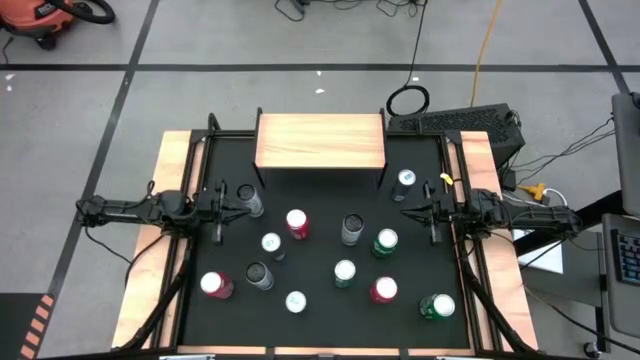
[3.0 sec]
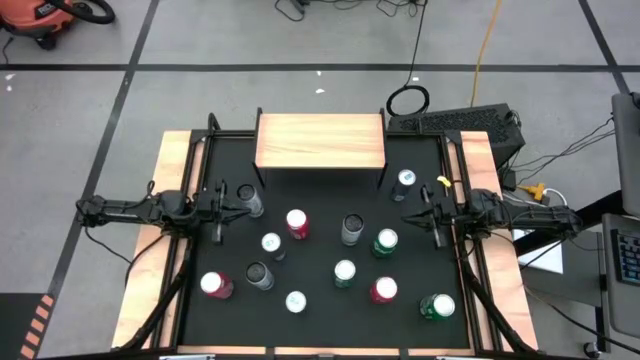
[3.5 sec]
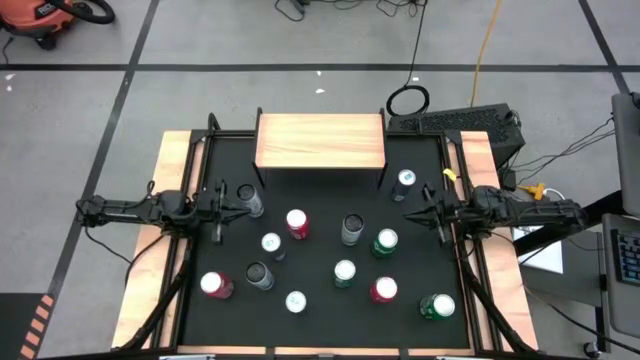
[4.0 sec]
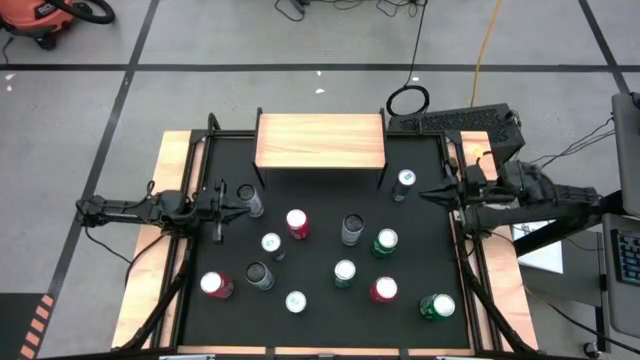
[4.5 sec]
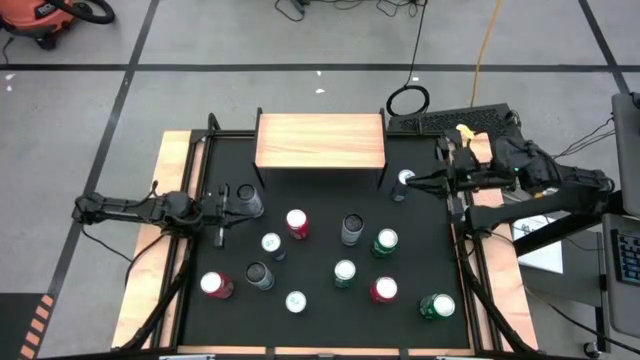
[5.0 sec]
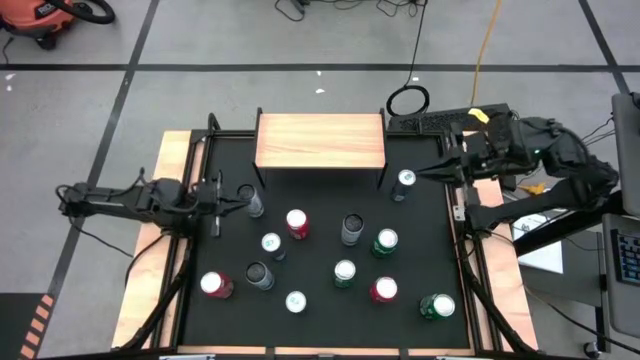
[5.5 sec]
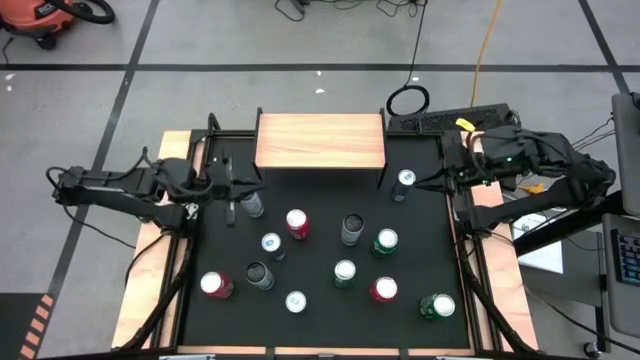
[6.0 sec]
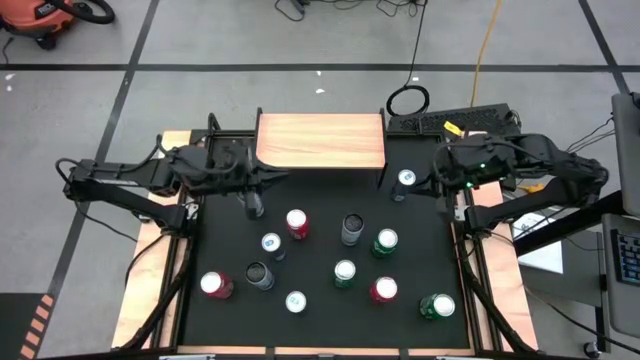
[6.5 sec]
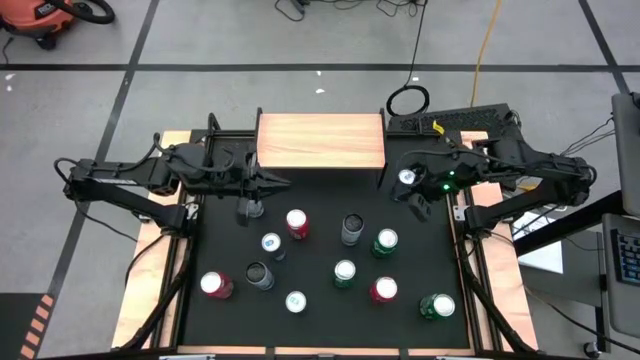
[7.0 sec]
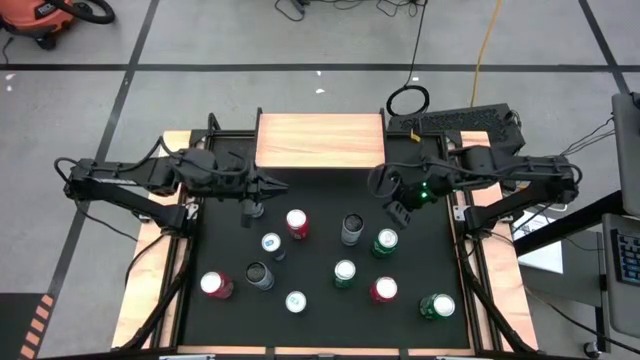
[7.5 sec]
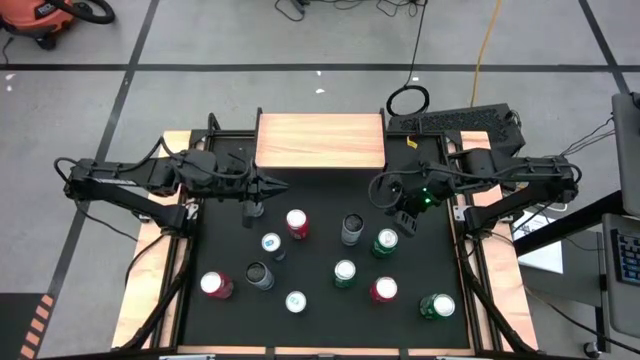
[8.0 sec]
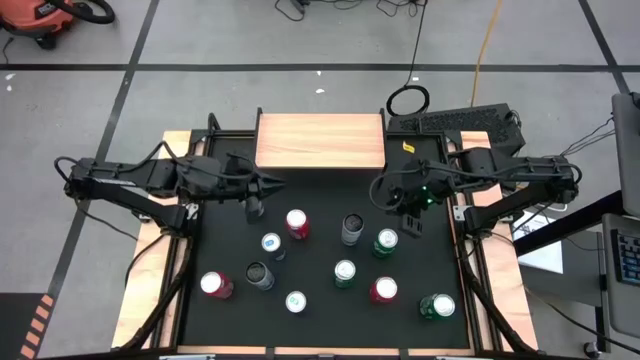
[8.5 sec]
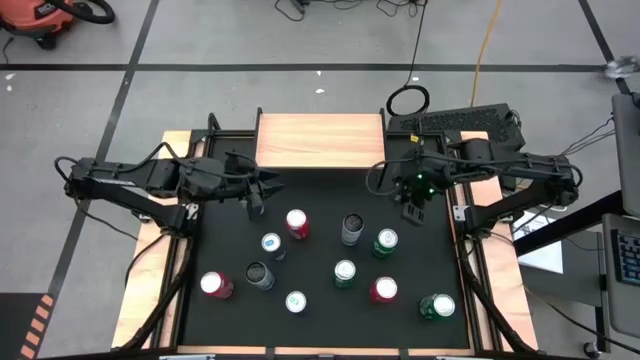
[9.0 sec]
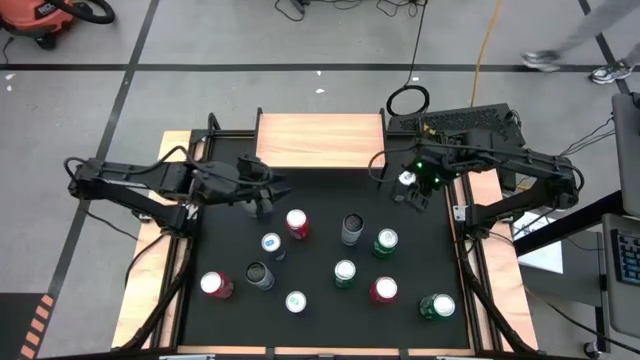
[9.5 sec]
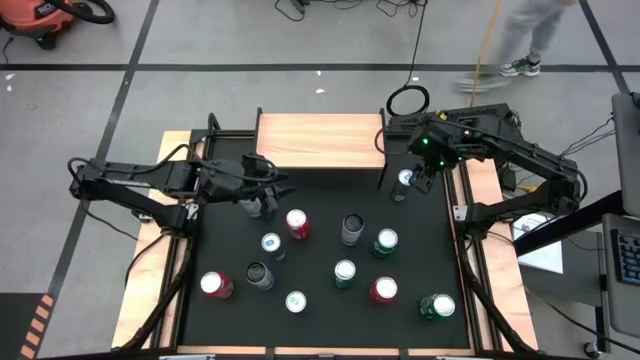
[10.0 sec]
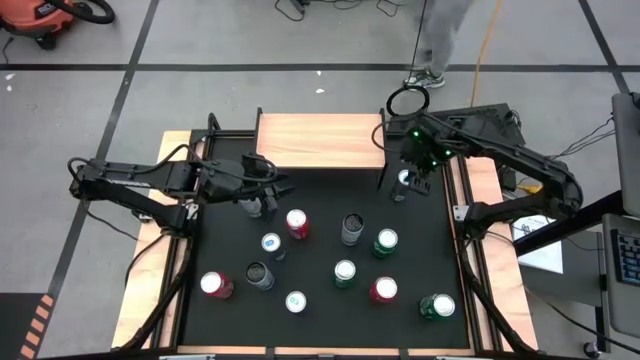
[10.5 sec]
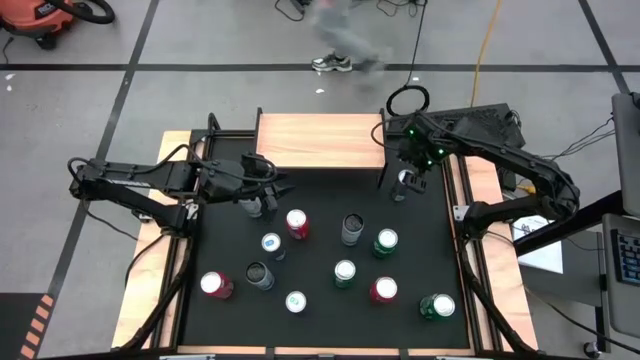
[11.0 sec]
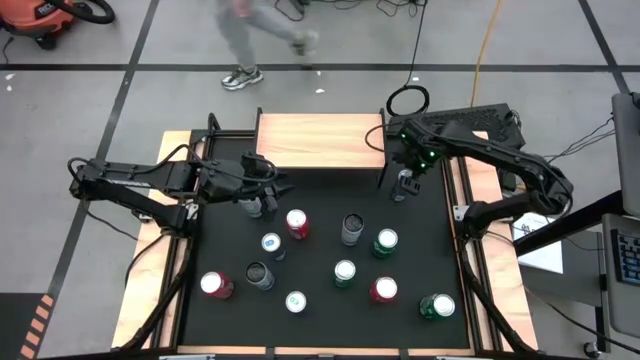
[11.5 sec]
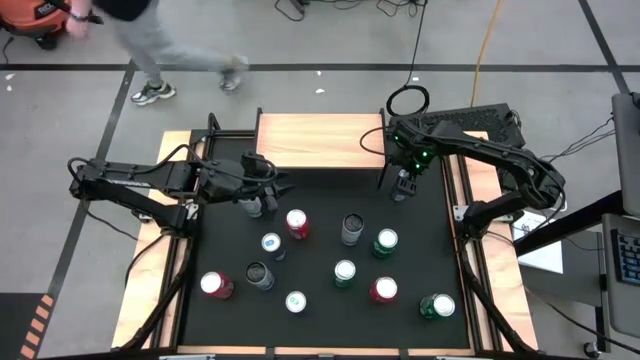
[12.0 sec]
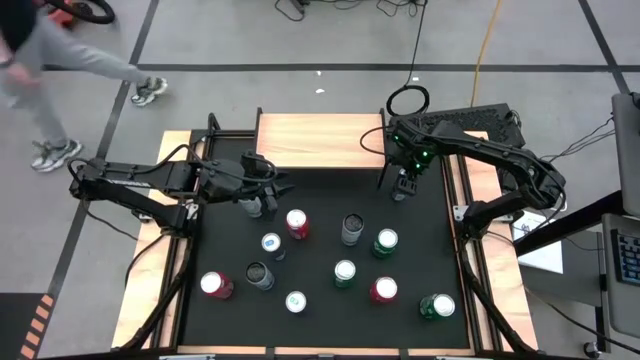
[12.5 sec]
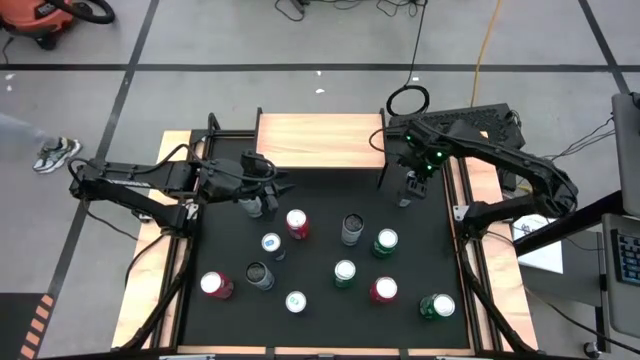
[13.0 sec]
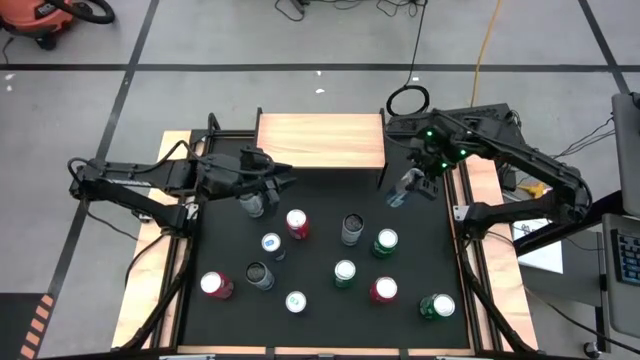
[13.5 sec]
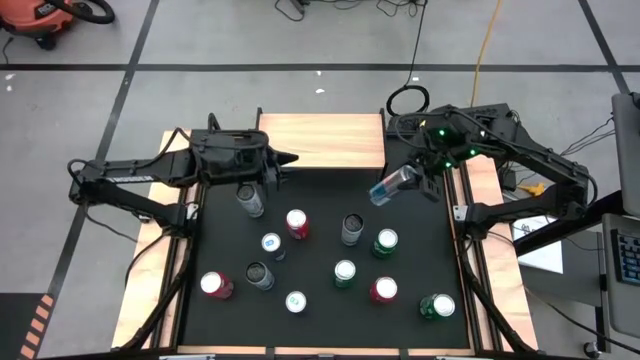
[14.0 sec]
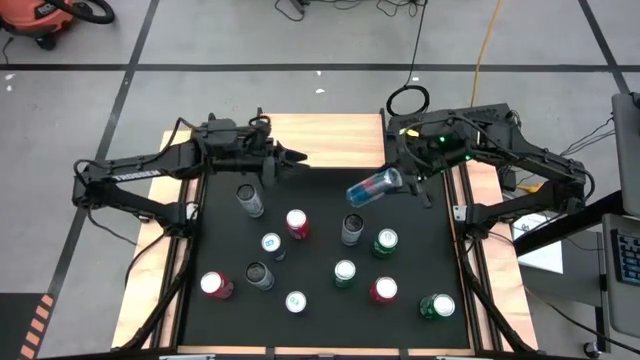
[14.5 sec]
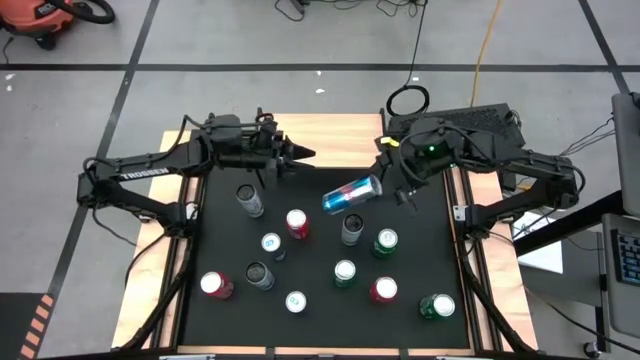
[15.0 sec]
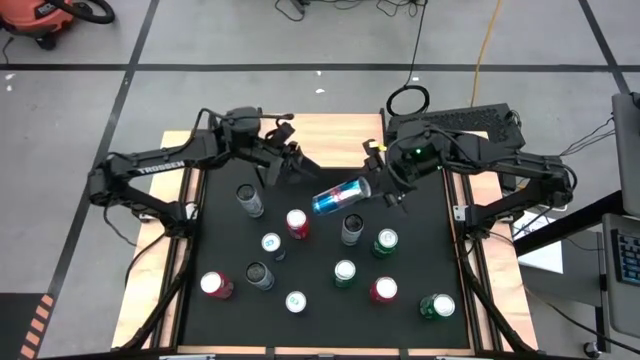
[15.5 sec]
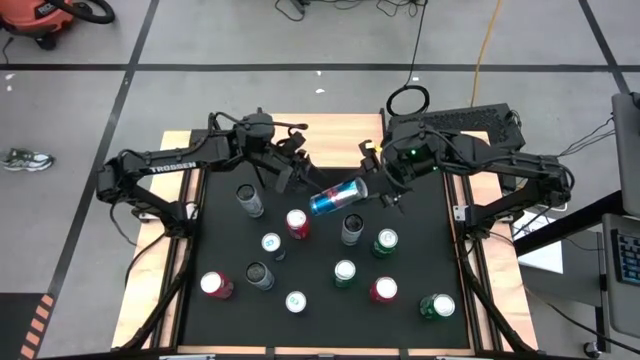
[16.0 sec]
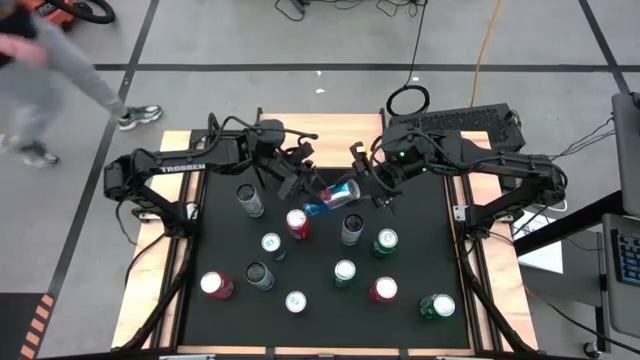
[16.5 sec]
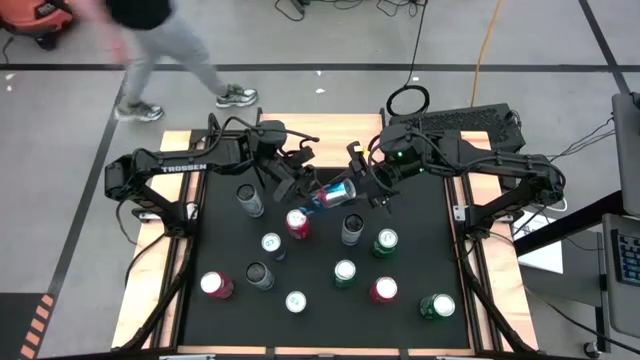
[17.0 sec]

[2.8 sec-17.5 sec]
Task: Place canned beverage on shelf
Put the top right blue soda can on the shelf

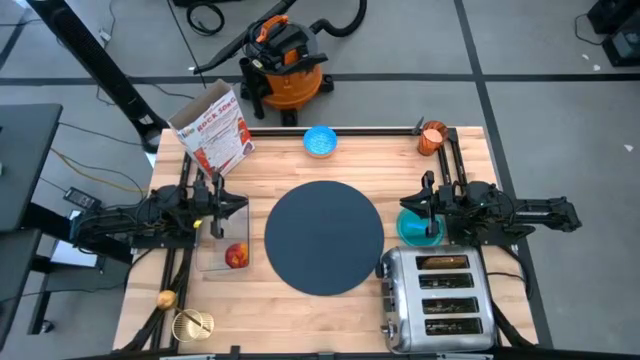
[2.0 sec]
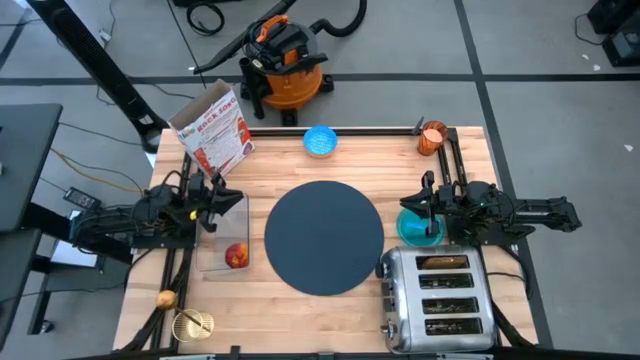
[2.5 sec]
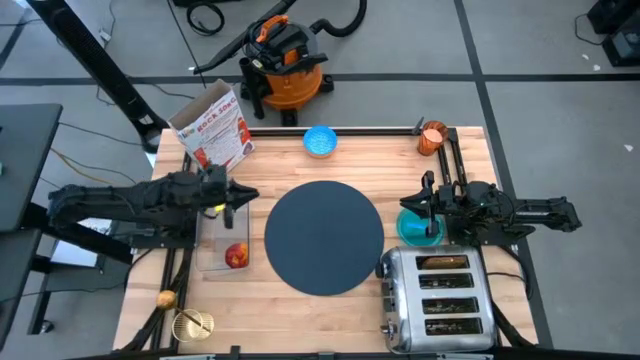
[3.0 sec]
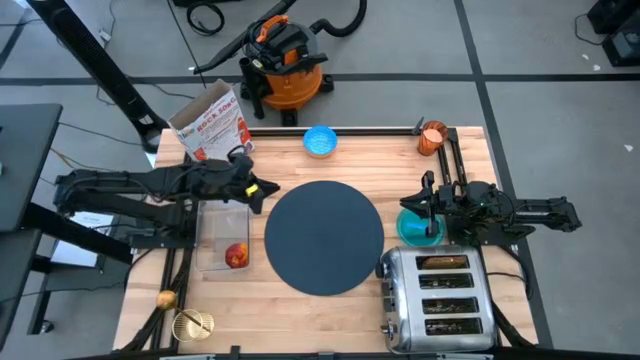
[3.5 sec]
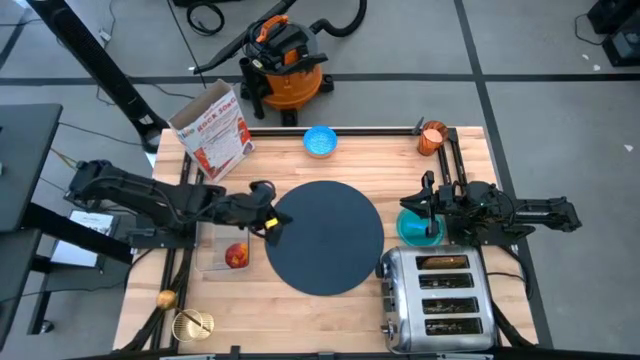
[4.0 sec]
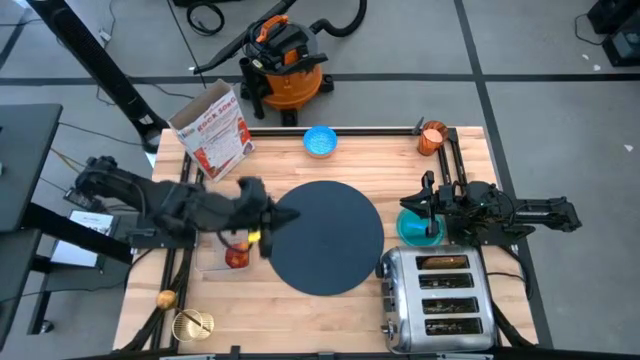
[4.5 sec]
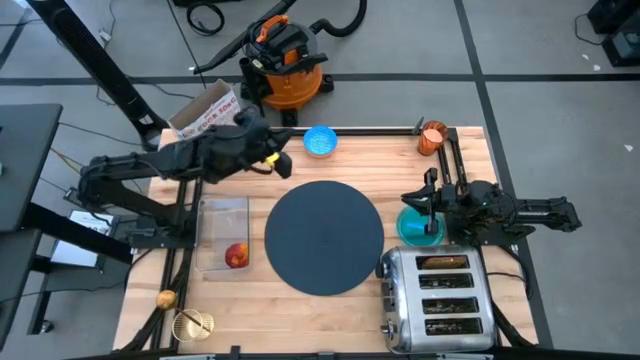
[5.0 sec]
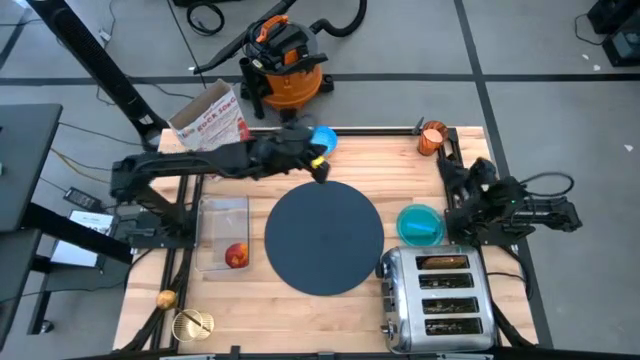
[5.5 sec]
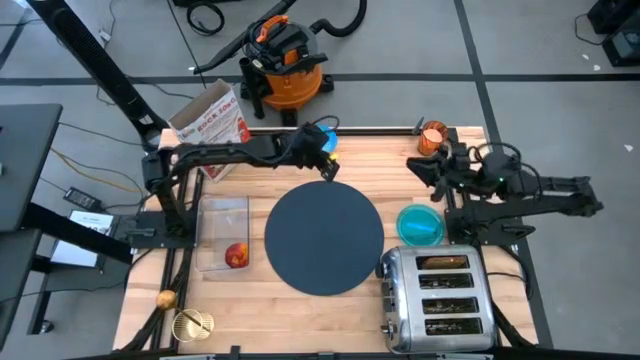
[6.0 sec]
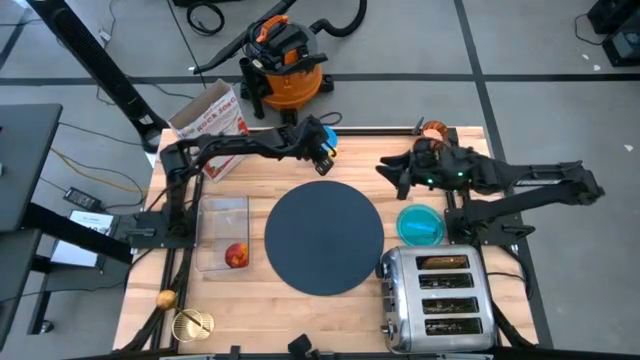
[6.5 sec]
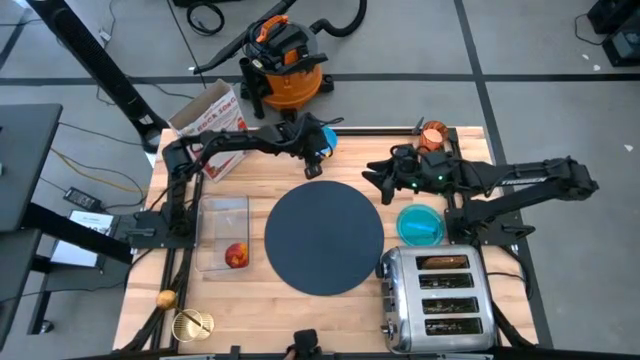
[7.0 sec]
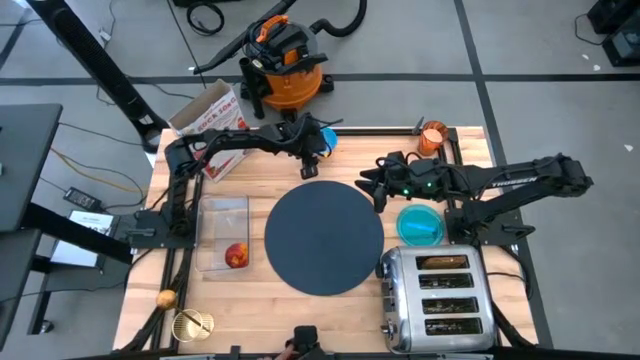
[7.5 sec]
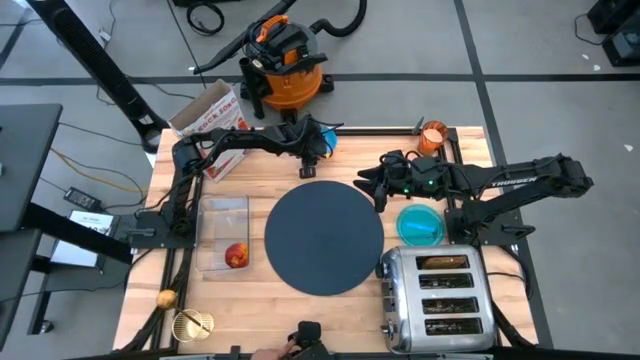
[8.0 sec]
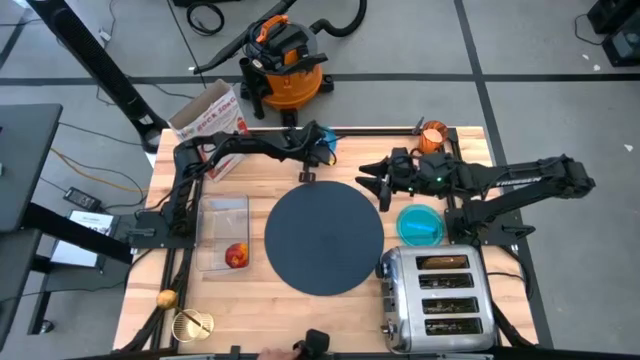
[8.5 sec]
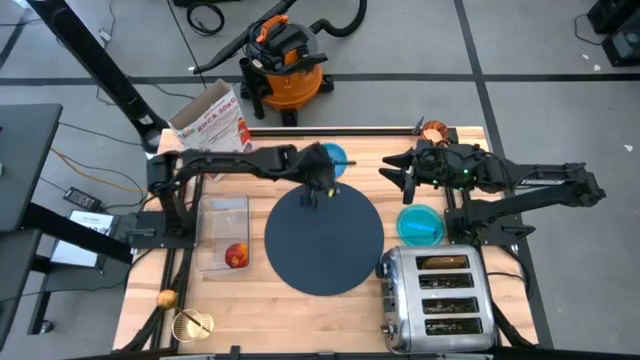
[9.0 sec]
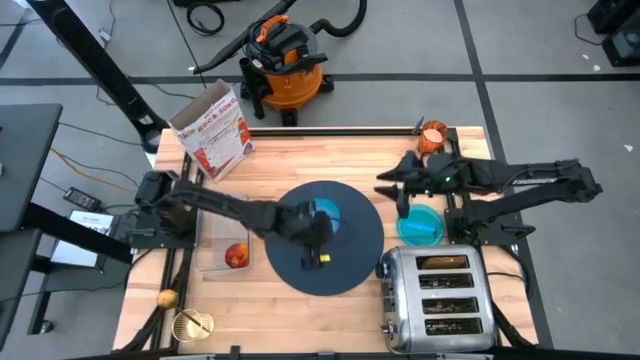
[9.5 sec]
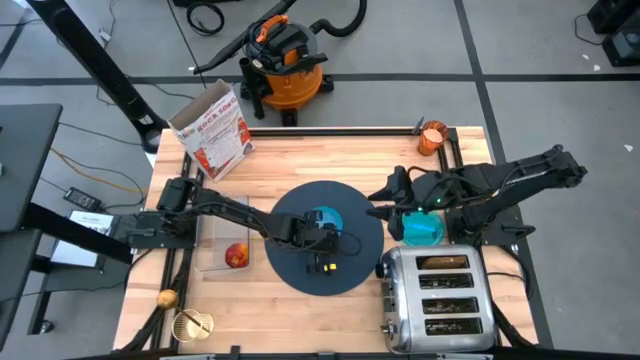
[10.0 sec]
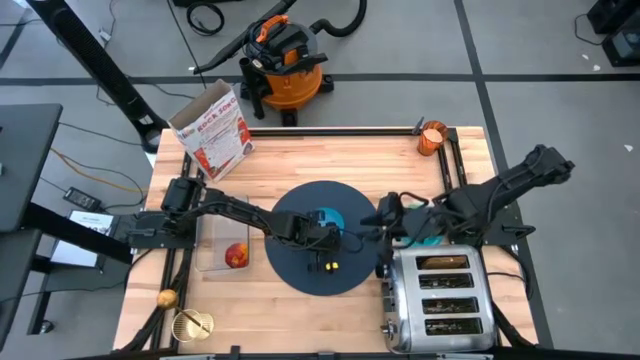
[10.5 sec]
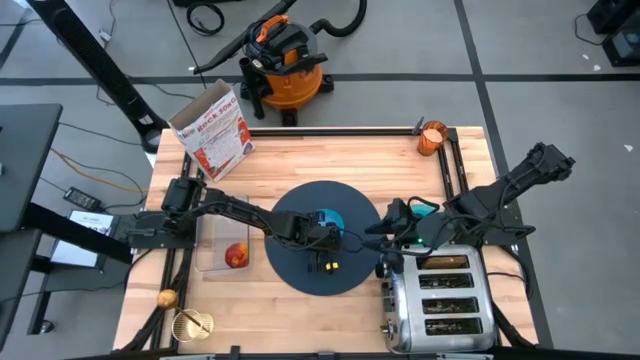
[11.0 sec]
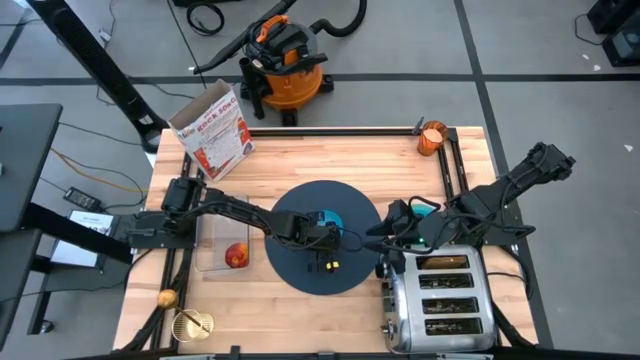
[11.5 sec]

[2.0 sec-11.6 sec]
Task: Arrange a breakfast setting
Put the blue bowl on the blue tablemat
